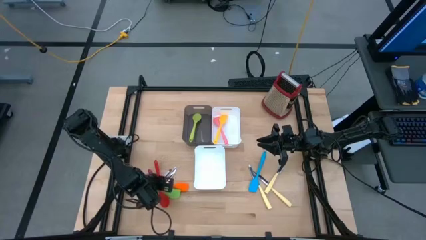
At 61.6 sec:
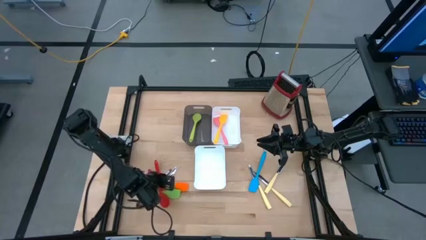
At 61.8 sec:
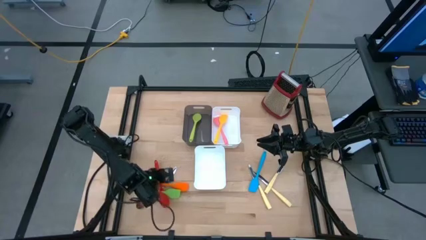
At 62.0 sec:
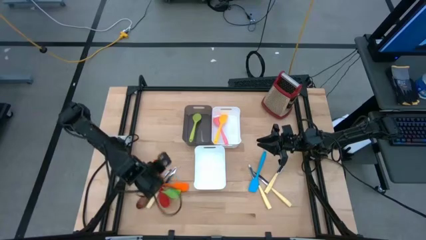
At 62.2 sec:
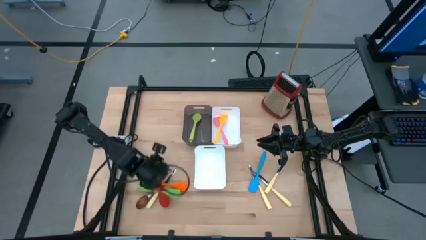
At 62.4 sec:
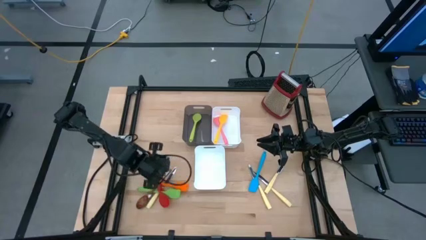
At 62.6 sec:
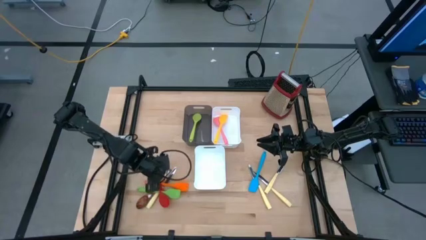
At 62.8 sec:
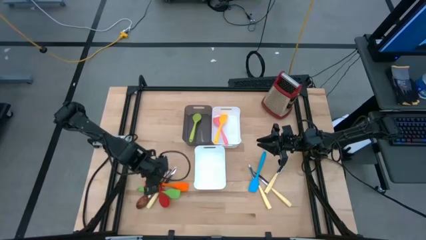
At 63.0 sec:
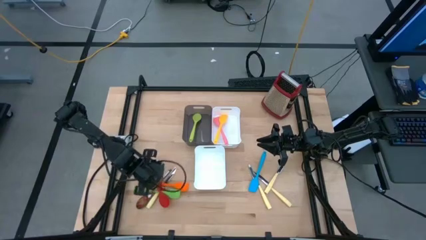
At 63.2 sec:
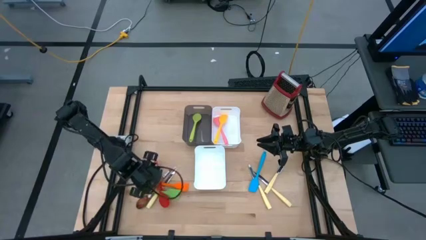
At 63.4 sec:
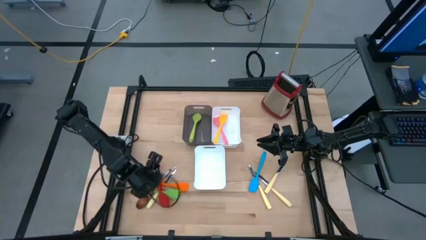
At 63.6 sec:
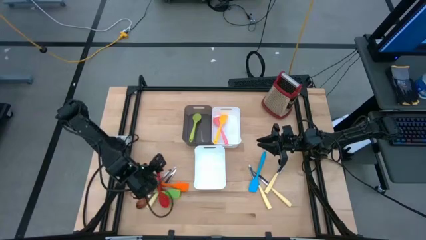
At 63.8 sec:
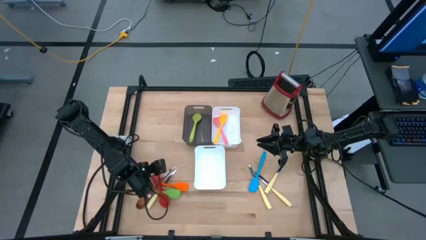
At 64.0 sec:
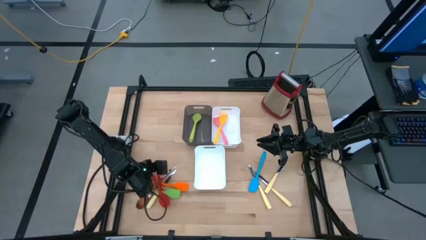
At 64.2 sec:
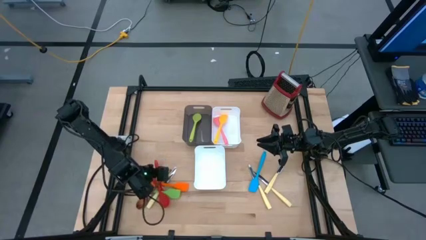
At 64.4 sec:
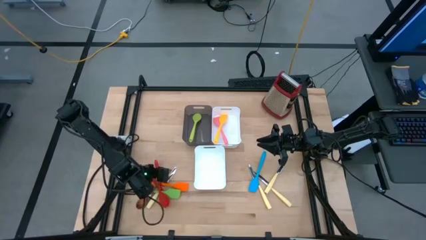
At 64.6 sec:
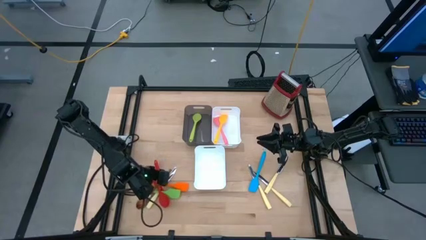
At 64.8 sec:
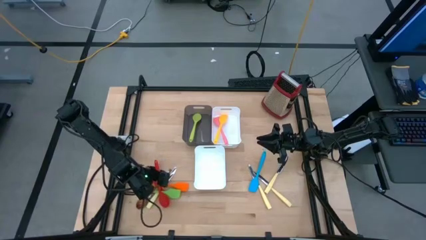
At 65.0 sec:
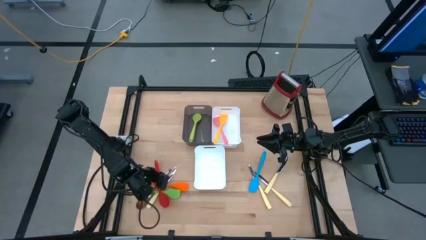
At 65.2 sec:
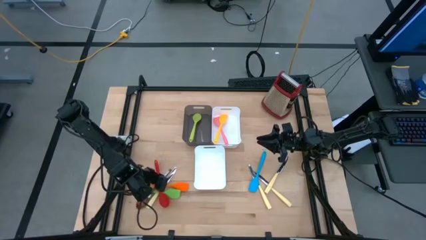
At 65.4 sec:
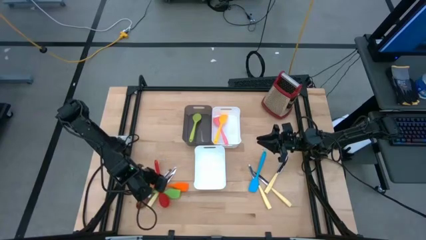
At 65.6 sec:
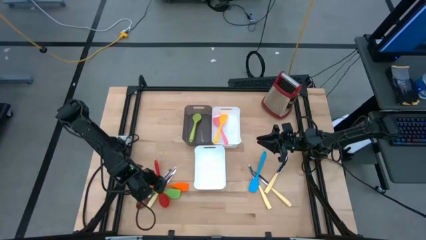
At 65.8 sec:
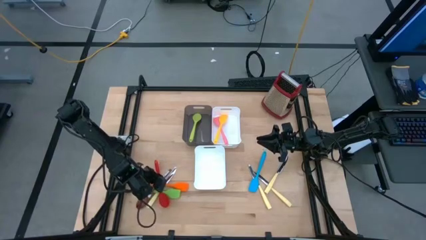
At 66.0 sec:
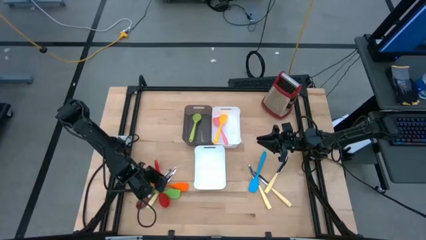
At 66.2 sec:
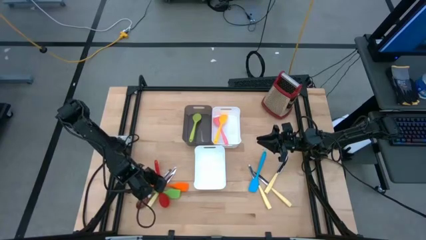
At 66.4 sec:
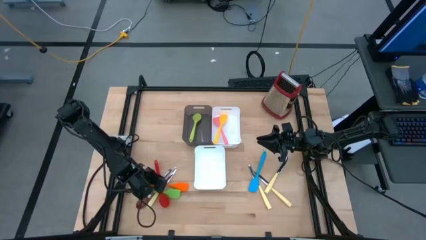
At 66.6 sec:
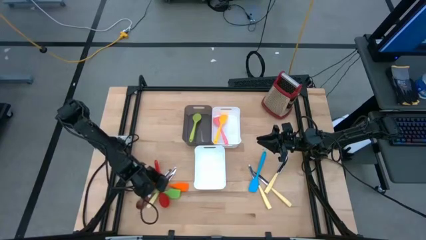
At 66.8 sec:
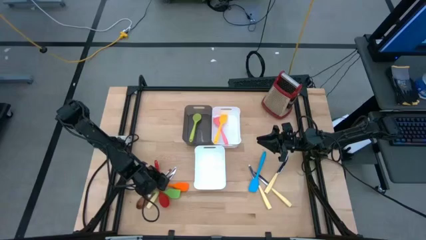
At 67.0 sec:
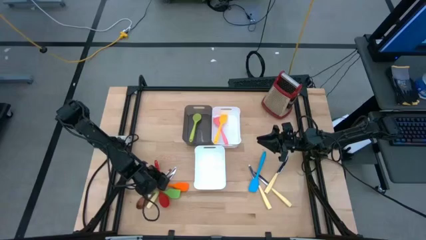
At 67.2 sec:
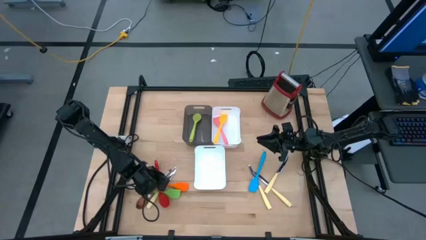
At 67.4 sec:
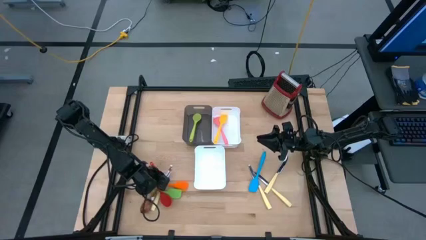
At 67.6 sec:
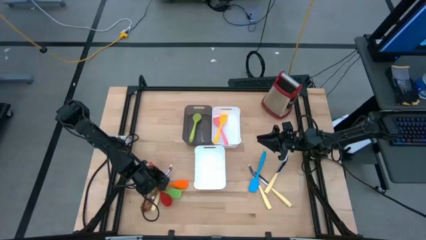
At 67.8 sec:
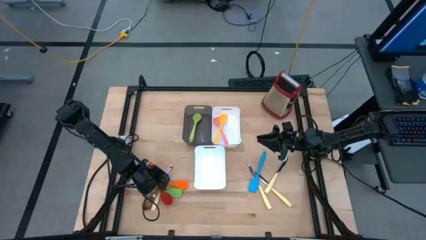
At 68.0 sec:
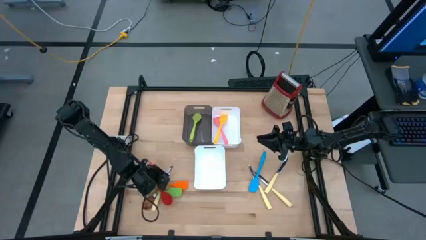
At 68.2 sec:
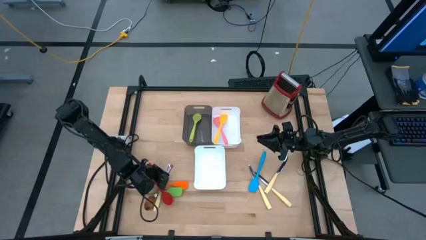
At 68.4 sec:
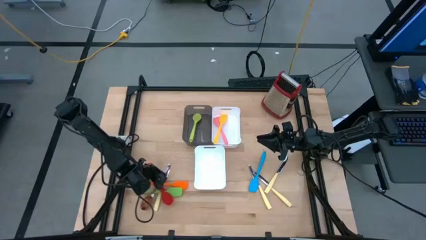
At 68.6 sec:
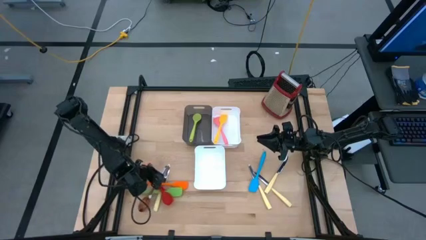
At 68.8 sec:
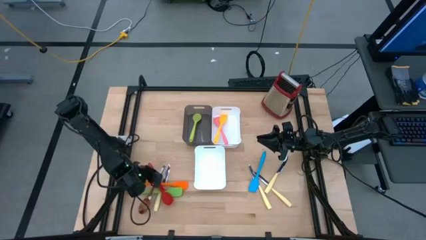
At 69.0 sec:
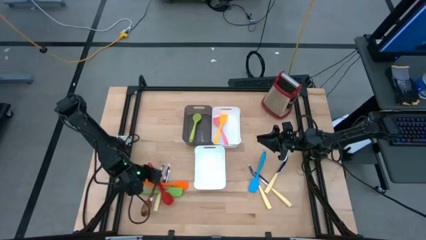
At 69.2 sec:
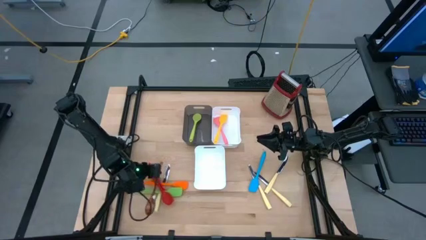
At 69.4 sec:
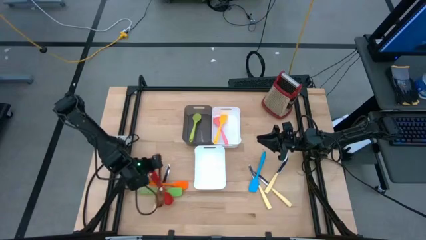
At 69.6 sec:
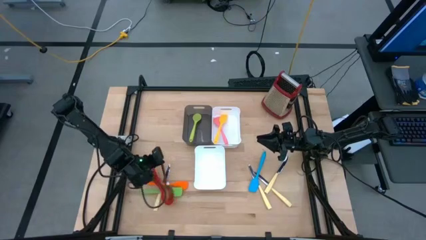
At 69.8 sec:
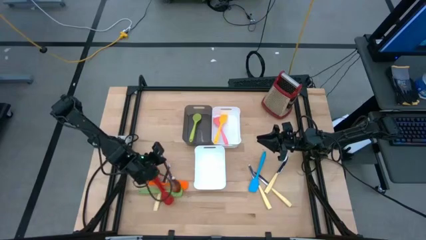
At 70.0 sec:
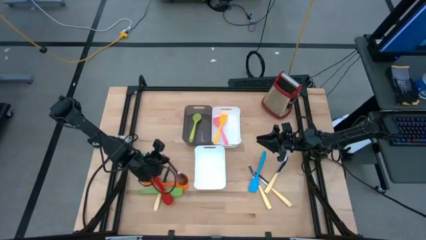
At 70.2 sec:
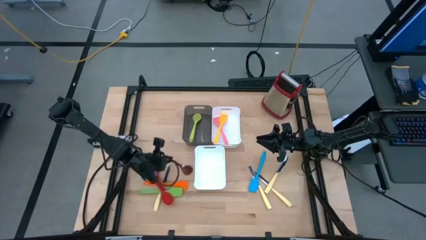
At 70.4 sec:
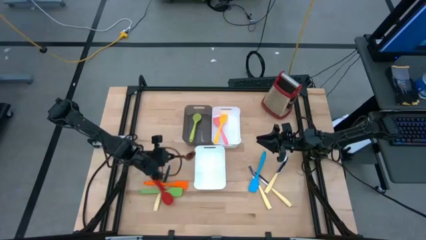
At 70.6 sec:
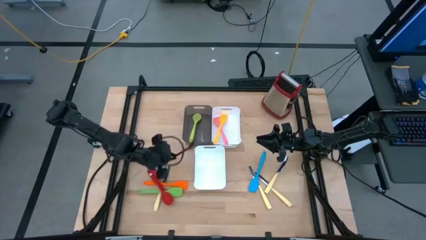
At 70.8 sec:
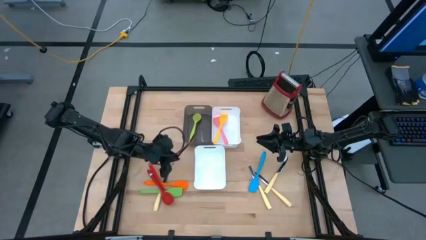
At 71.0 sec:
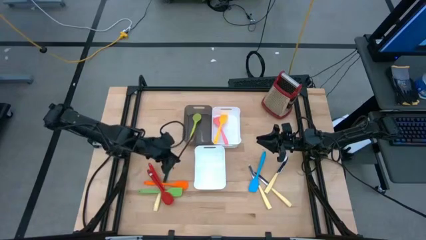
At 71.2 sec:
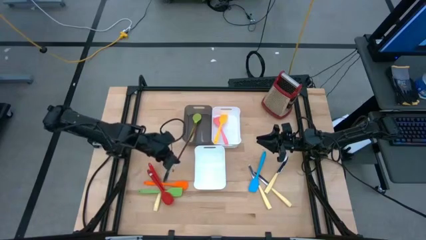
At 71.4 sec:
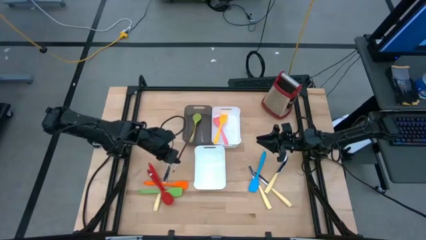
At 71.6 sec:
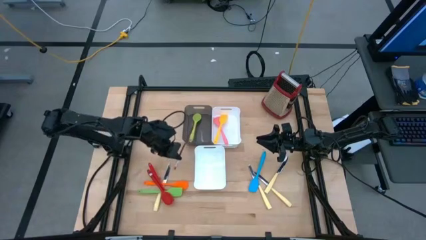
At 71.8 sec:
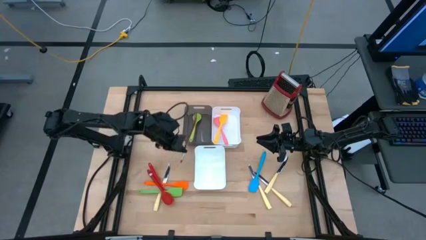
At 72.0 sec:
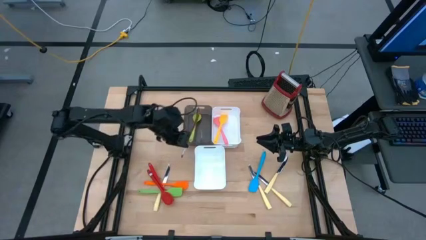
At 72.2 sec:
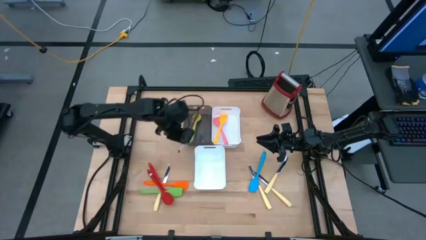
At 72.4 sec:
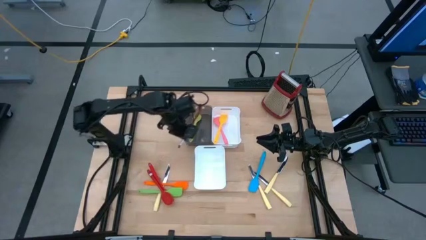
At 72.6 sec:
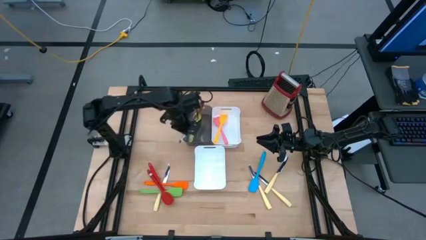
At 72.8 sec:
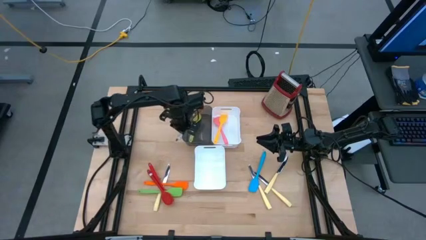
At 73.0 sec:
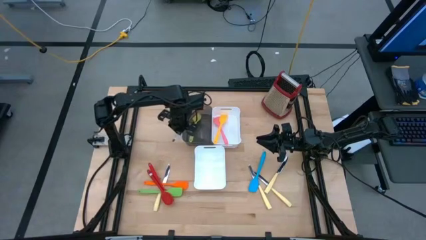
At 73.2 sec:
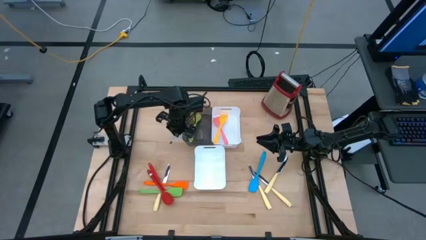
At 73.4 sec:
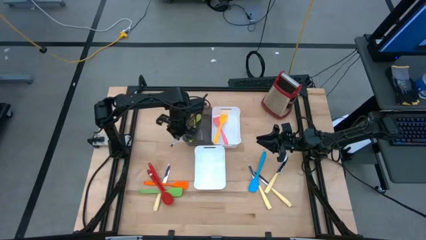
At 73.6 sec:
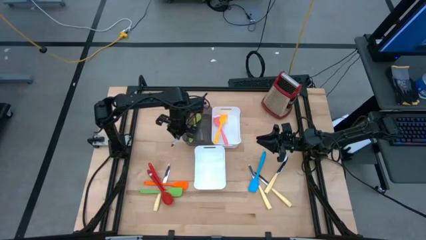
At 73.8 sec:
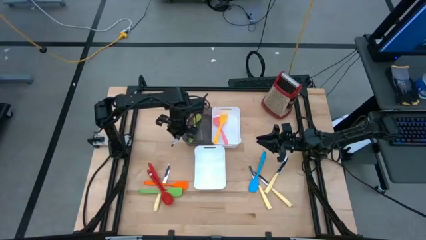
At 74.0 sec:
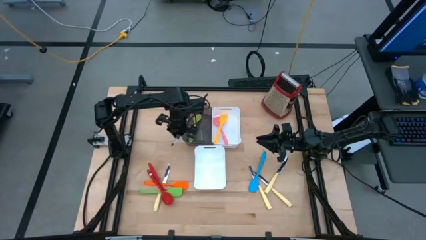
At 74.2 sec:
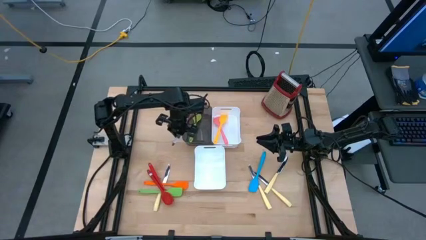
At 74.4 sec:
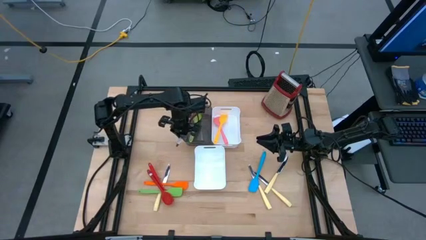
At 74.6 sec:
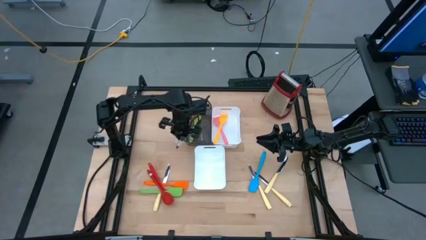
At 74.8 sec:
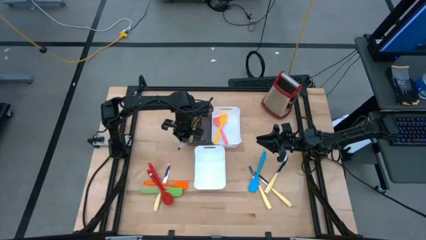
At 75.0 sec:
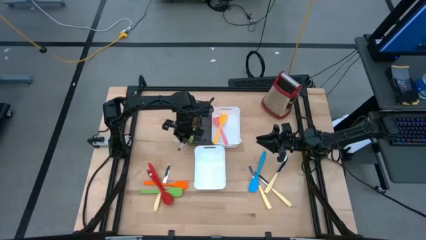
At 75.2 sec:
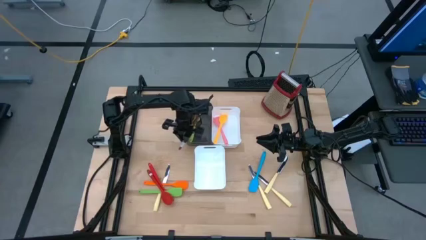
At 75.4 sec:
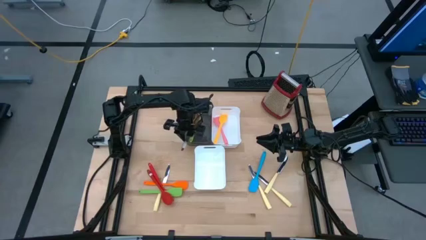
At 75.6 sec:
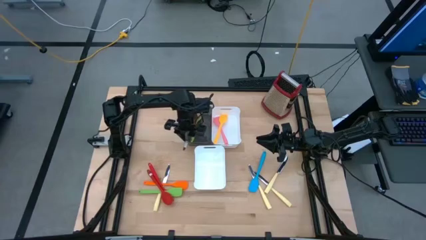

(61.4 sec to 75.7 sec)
Task: Pick & Place Kitchen Items
Put the wooden serving spoon into the black bin
